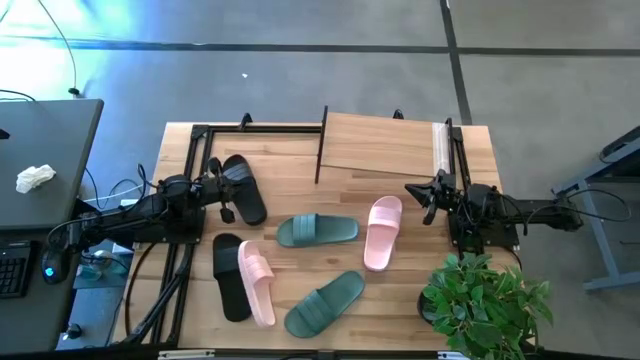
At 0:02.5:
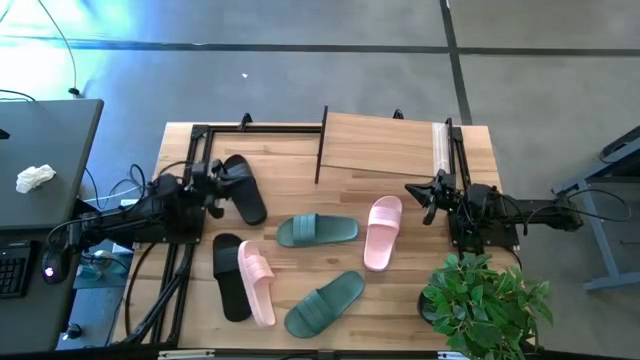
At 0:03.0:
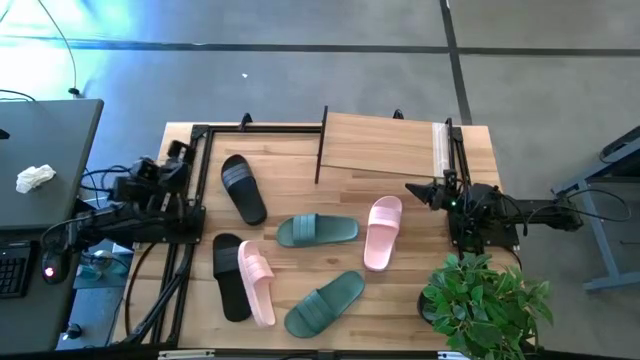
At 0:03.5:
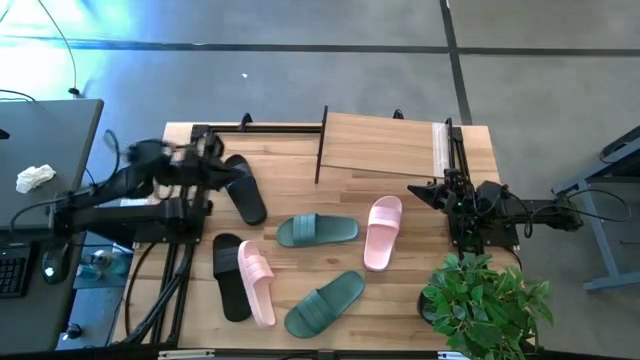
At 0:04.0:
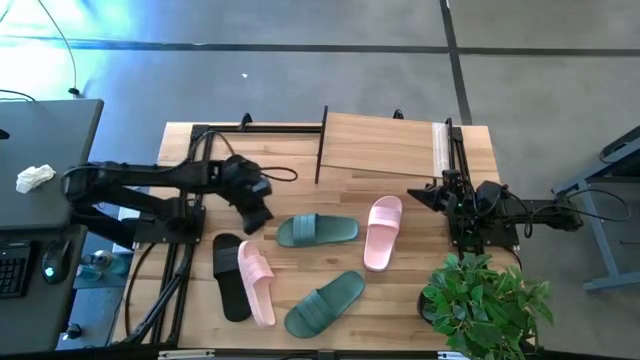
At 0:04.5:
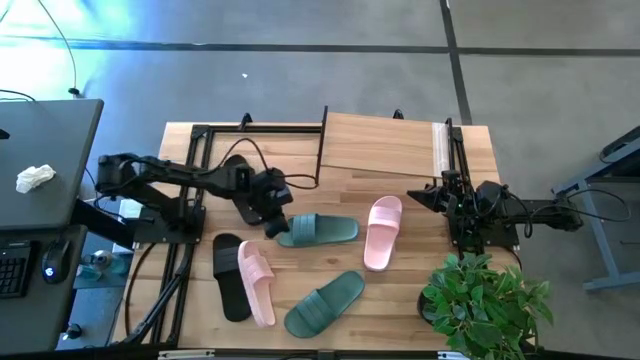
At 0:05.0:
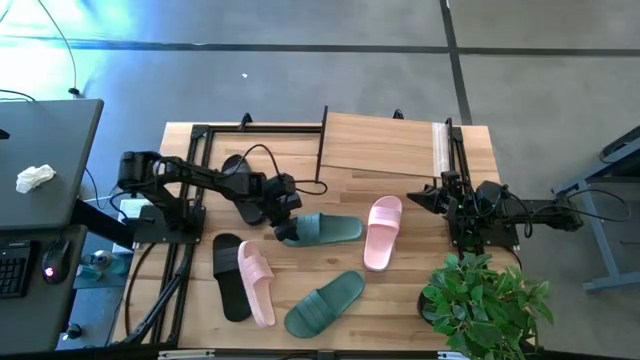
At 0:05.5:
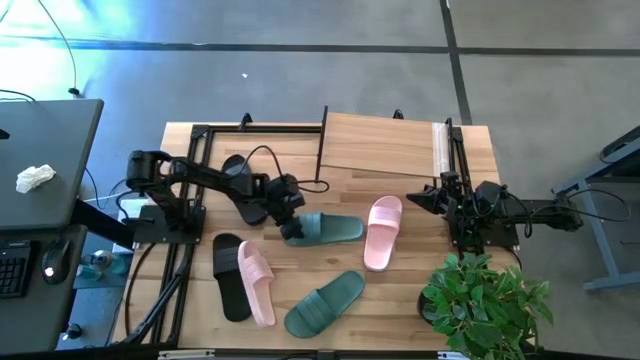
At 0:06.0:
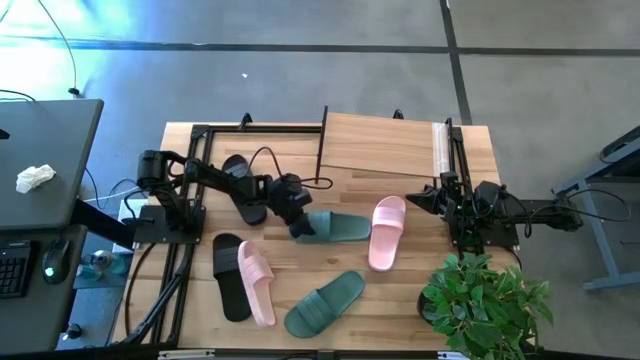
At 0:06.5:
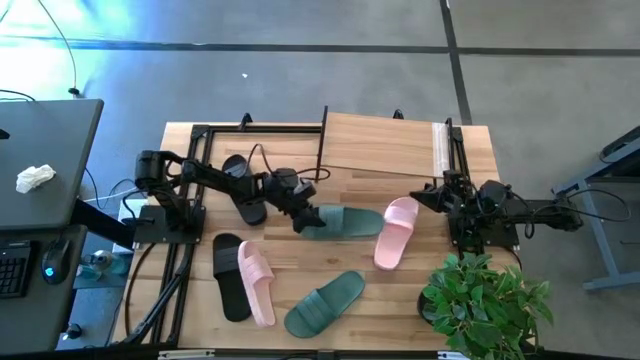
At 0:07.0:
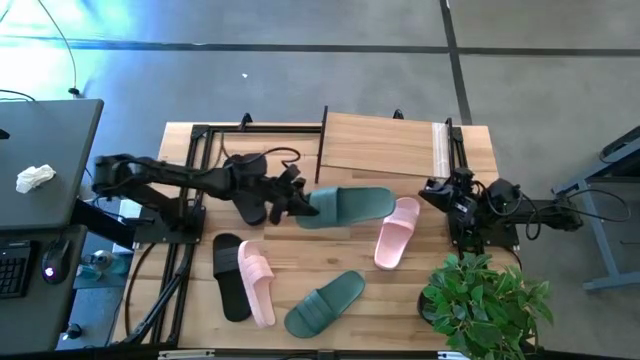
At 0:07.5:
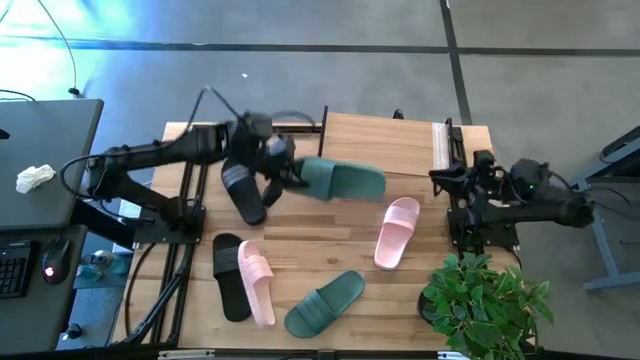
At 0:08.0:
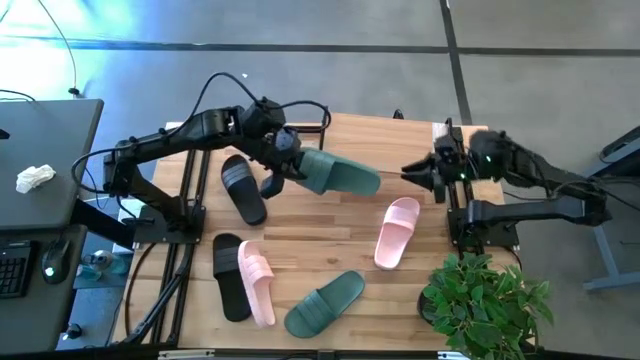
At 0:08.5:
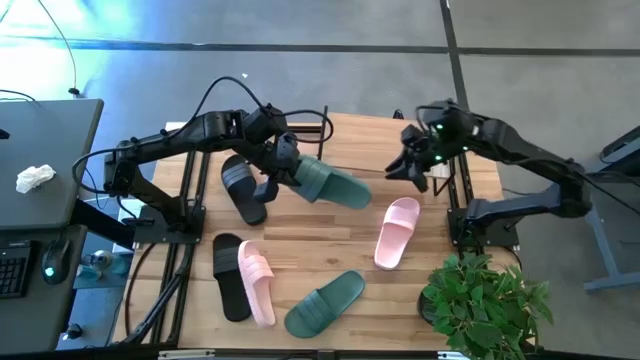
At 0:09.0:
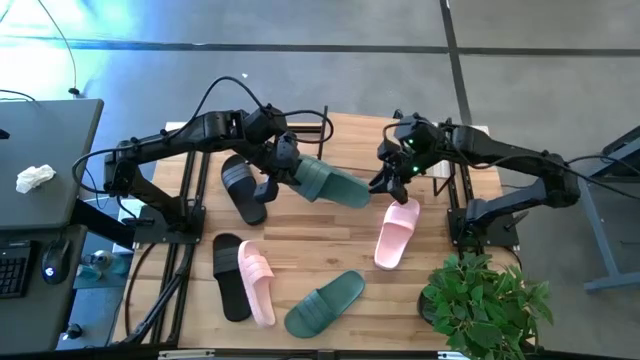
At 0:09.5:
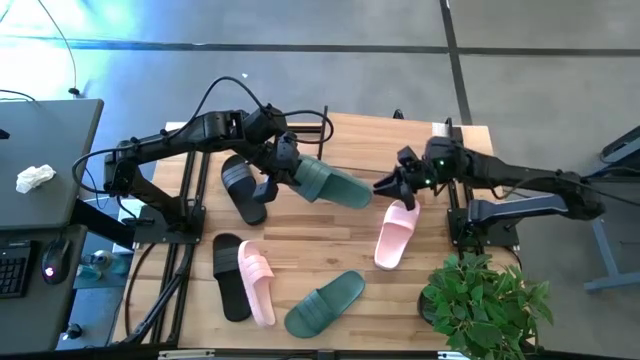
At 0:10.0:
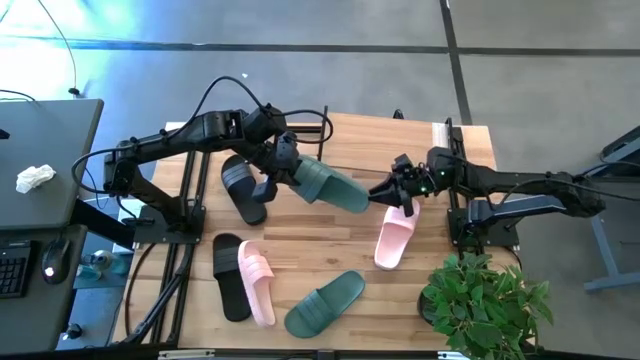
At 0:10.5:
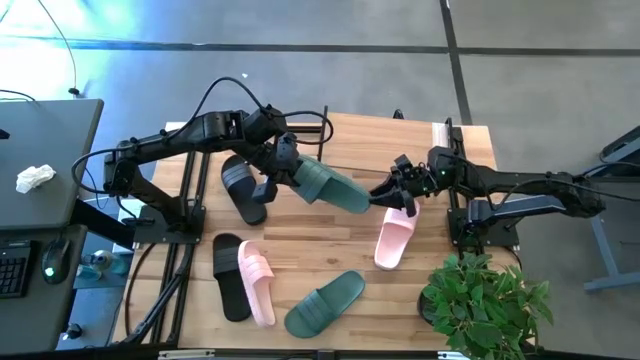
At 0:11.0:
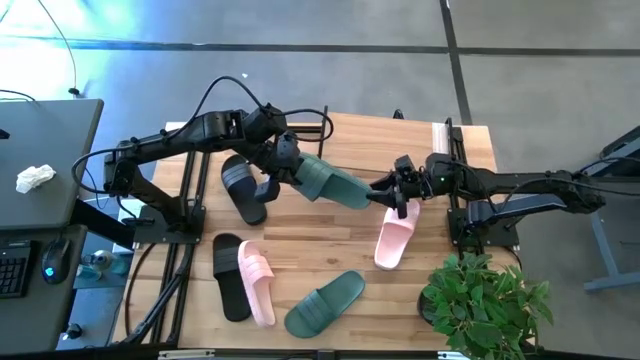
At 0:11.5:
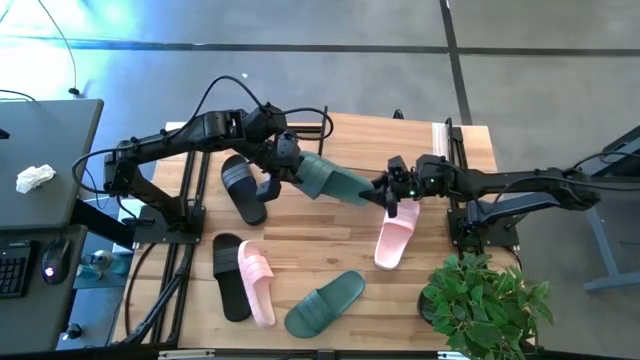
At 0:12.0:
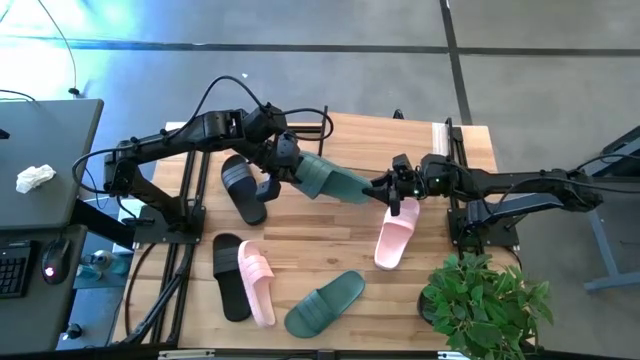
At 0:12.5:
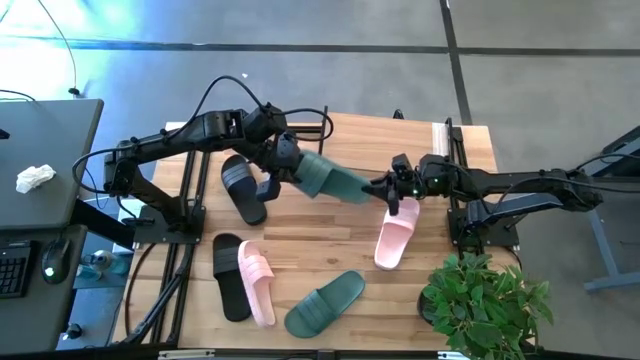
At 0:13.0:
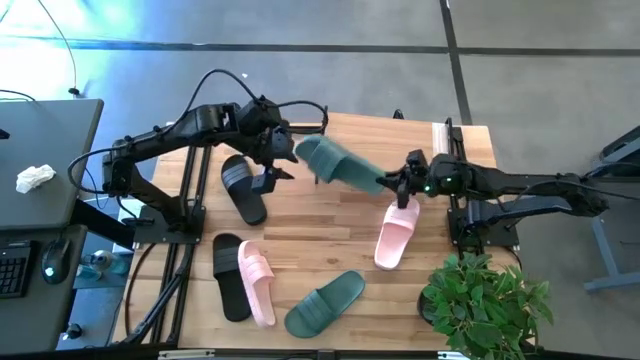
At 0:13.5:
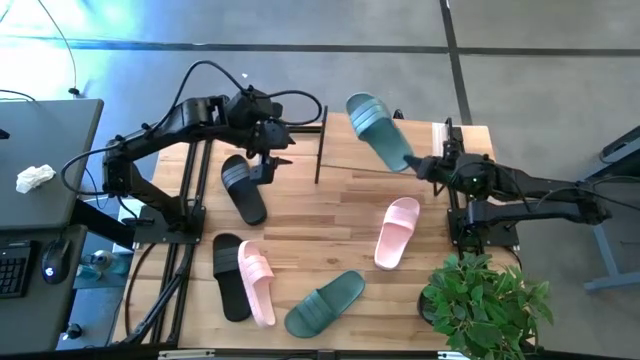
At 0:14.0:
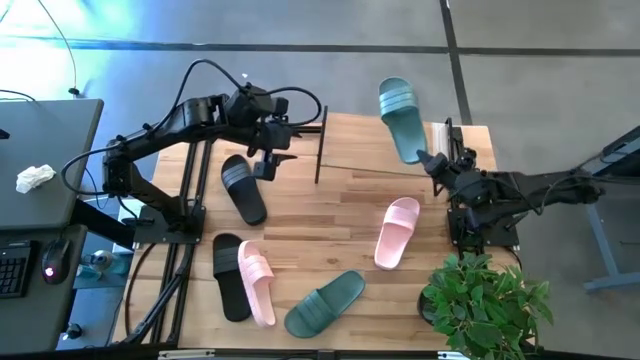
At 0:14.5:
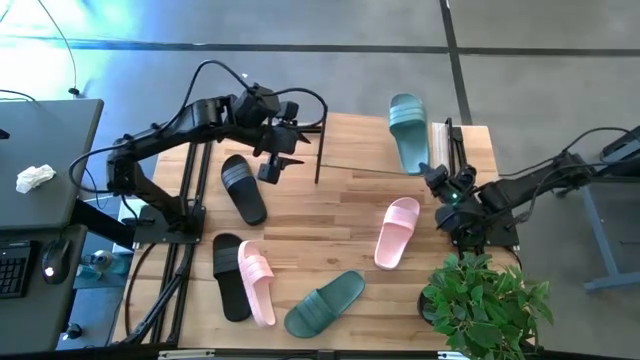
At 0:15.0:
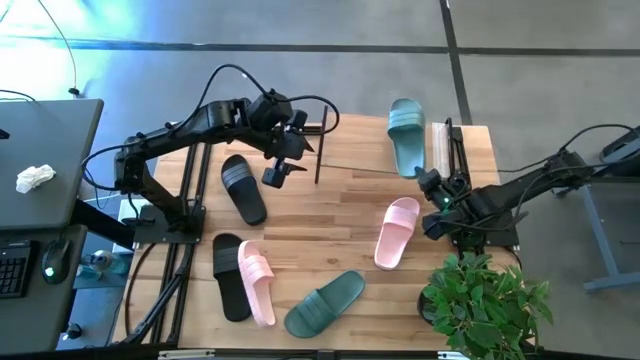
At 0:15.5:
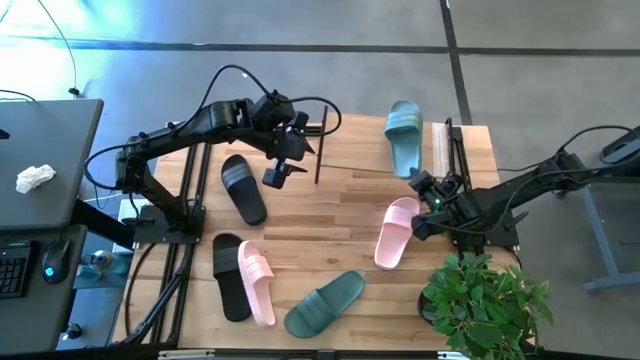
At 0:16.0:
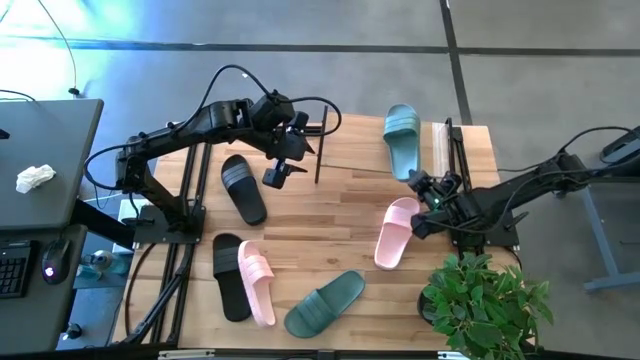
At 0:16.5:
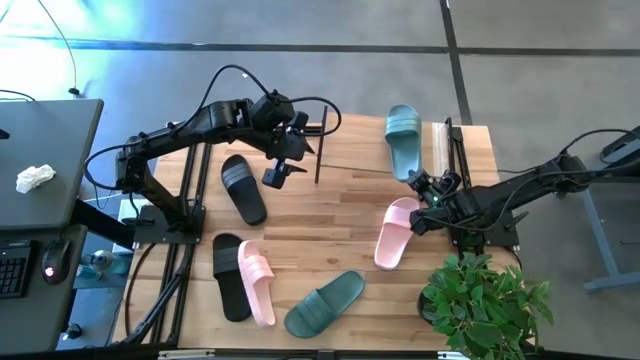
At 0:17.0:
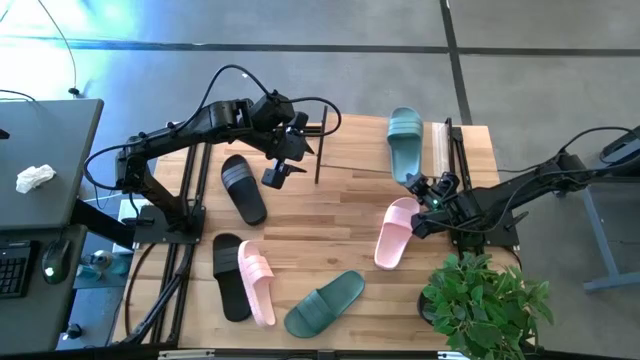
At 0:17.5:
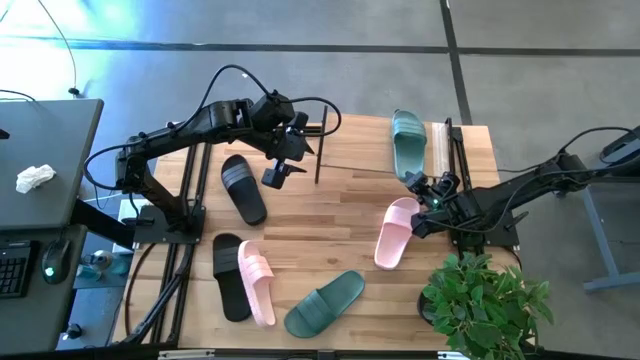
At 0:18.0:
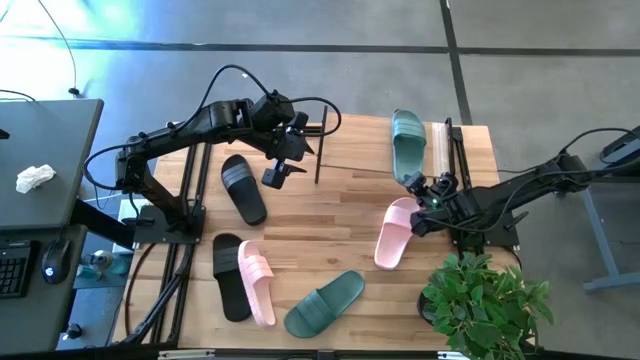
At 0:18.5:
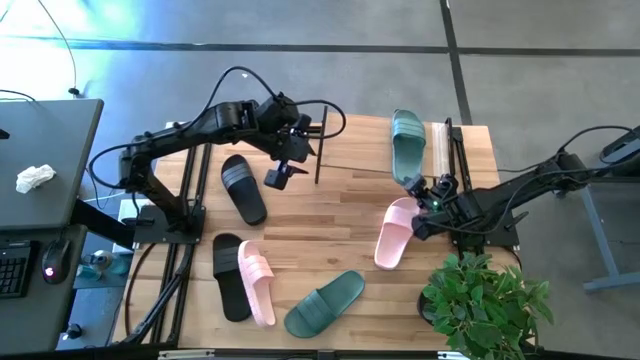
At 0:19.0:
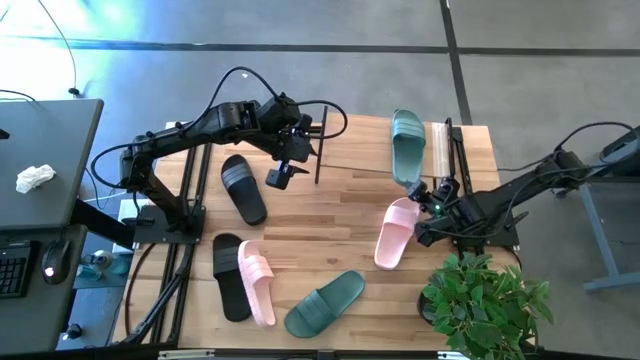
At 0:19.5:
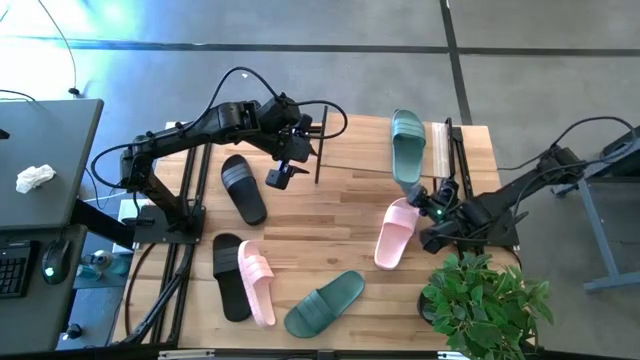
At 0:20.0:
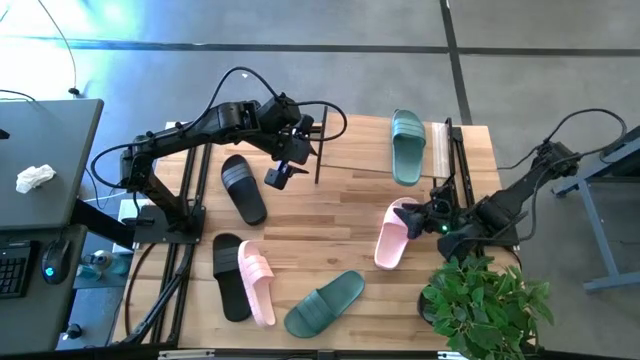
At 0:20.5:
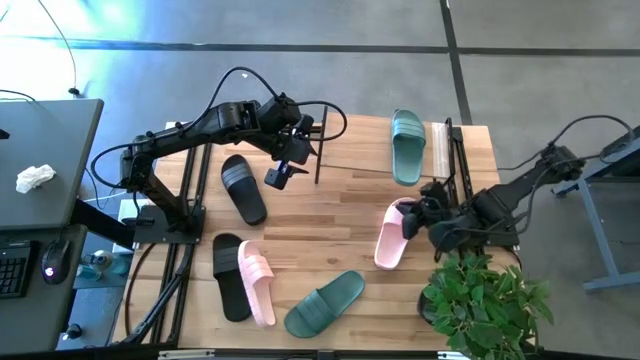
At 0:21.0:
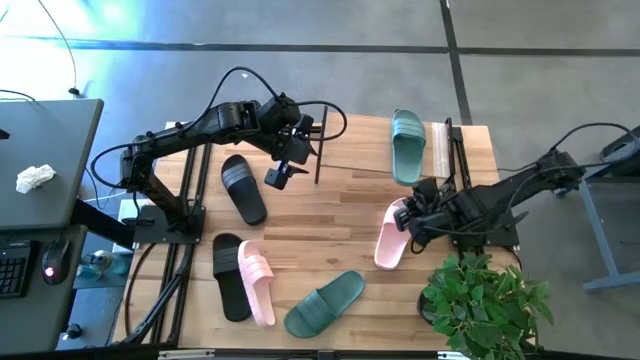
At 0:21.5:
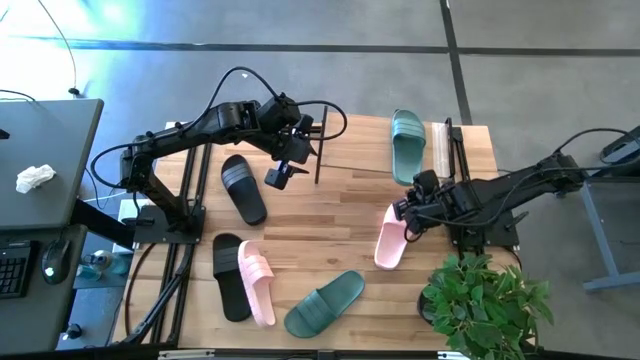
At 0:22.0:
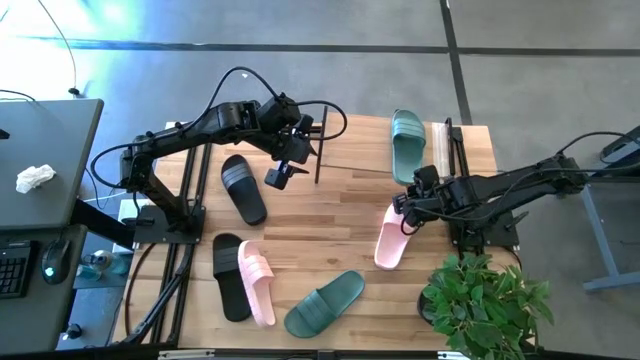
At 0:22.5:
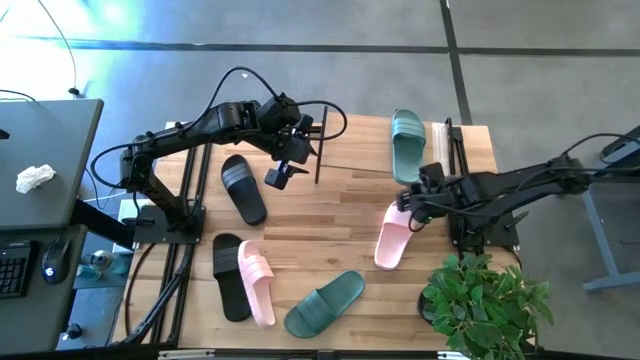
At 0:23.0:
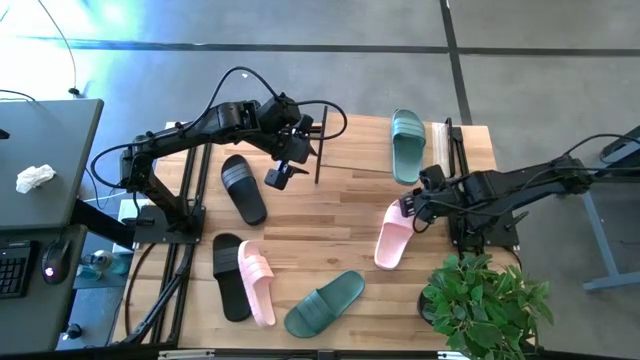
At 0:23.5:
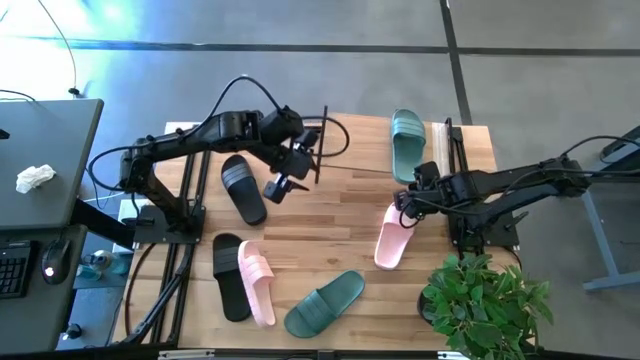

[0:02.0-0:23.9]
Task: Pick and place slides into the shelf
Put the top blue slides on the shelf
